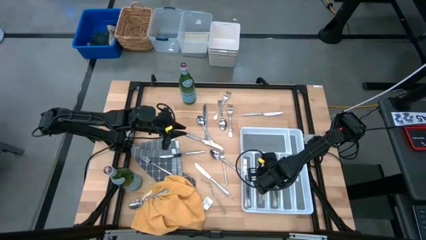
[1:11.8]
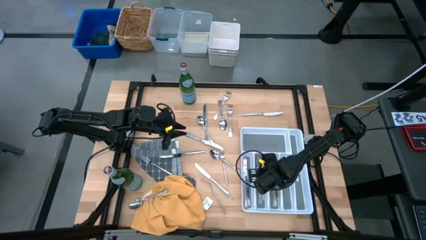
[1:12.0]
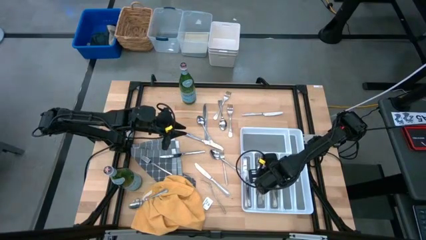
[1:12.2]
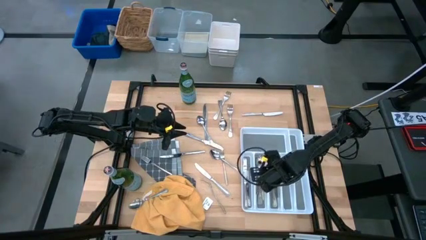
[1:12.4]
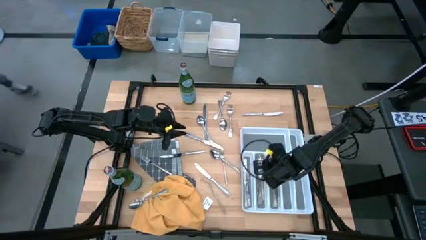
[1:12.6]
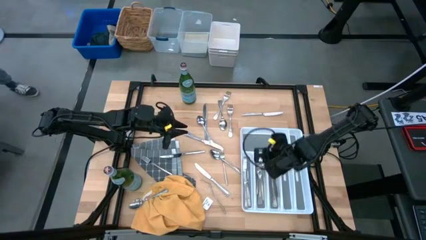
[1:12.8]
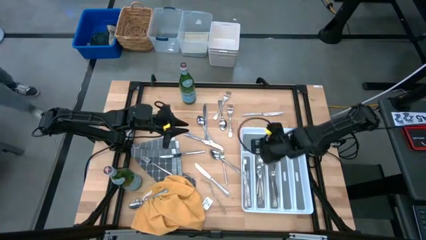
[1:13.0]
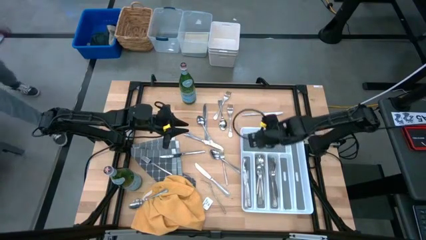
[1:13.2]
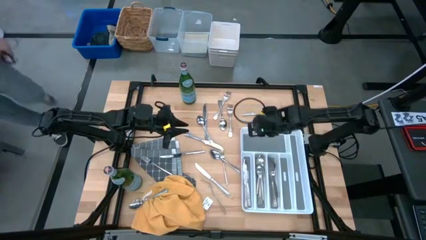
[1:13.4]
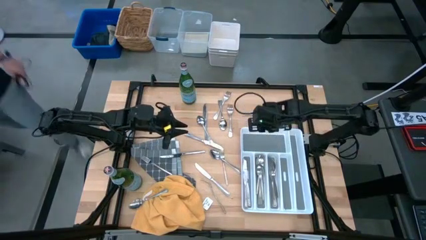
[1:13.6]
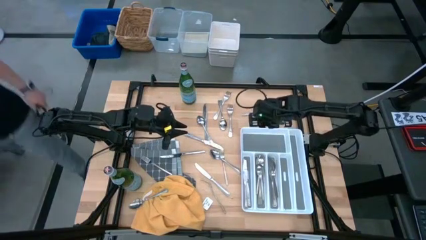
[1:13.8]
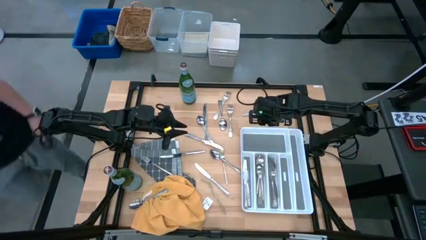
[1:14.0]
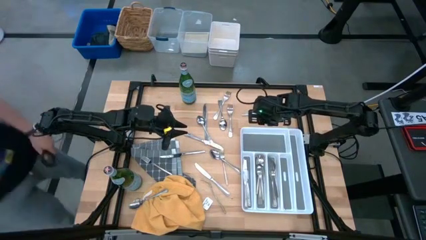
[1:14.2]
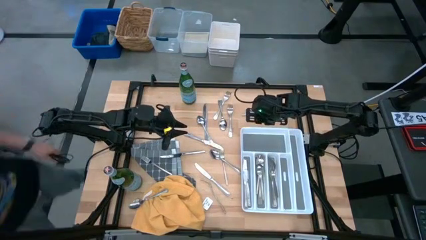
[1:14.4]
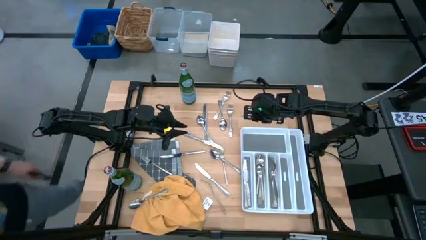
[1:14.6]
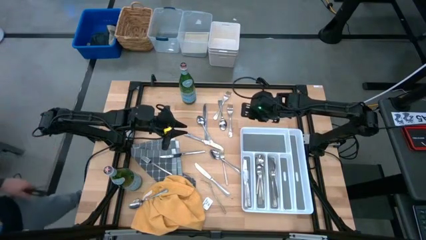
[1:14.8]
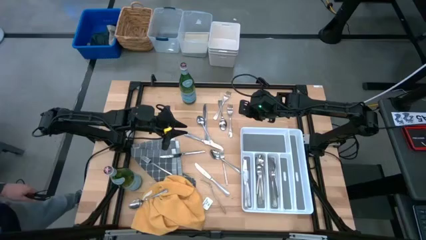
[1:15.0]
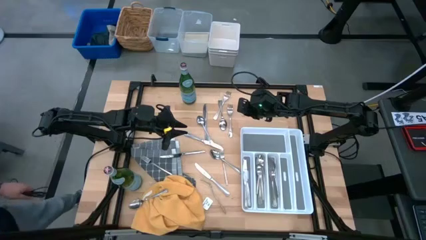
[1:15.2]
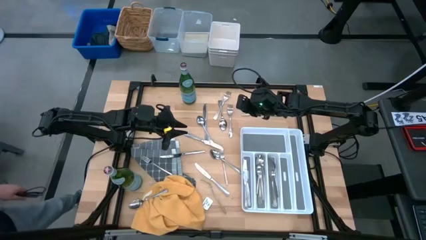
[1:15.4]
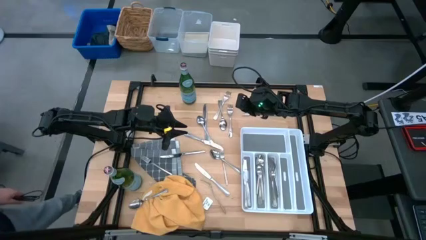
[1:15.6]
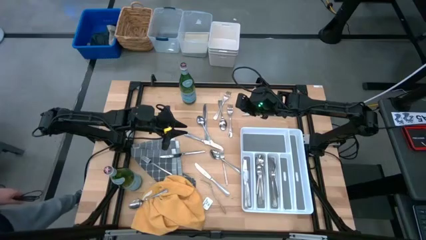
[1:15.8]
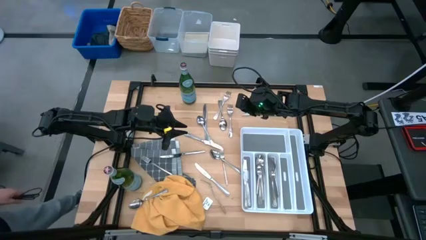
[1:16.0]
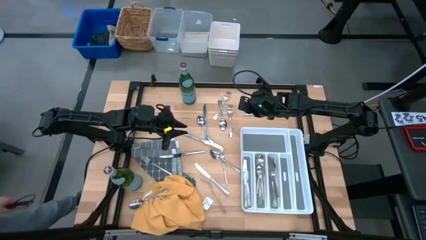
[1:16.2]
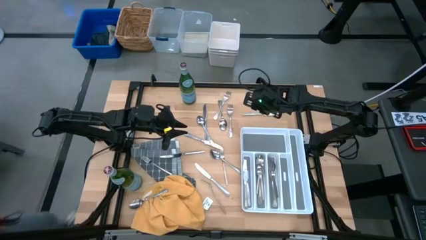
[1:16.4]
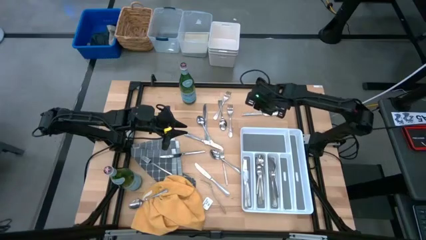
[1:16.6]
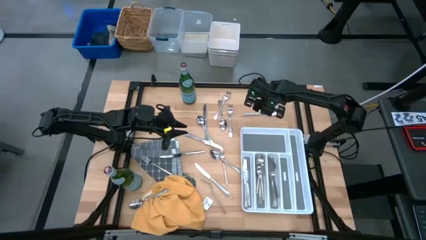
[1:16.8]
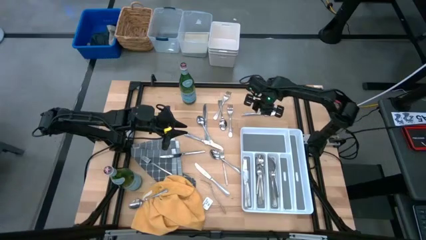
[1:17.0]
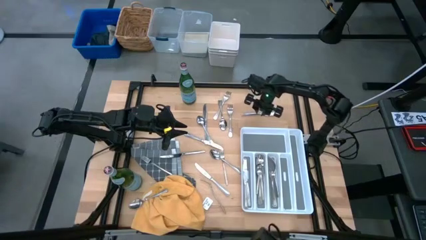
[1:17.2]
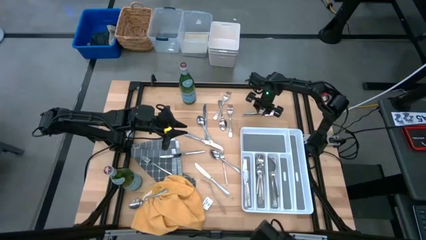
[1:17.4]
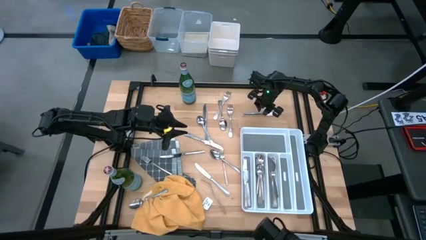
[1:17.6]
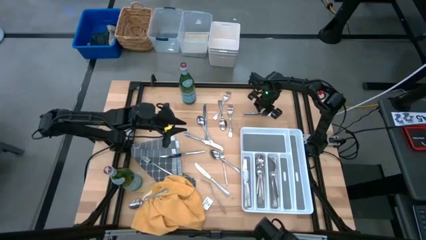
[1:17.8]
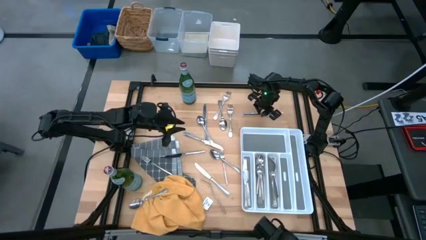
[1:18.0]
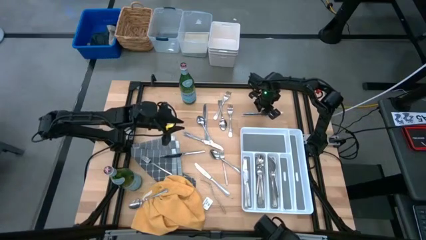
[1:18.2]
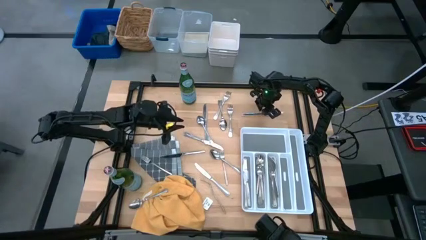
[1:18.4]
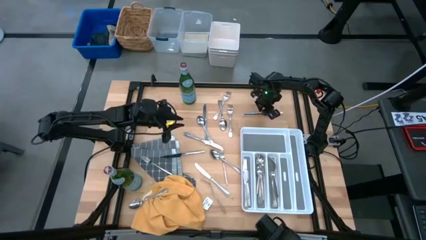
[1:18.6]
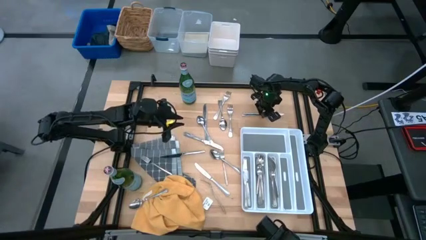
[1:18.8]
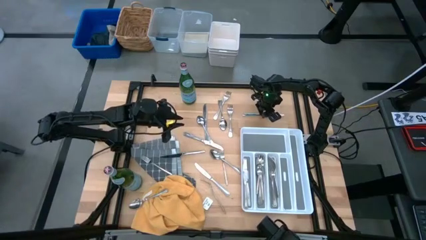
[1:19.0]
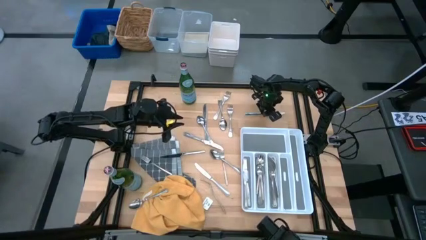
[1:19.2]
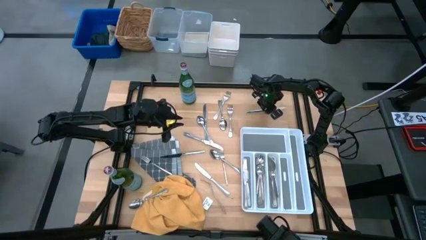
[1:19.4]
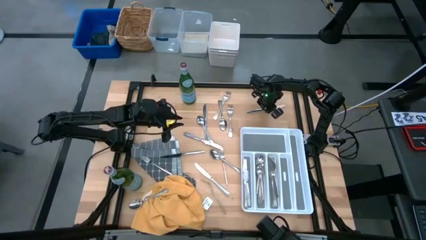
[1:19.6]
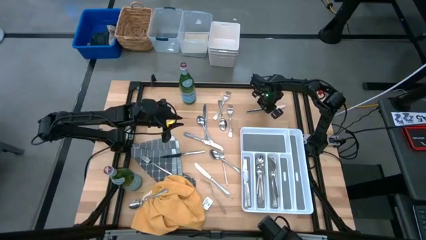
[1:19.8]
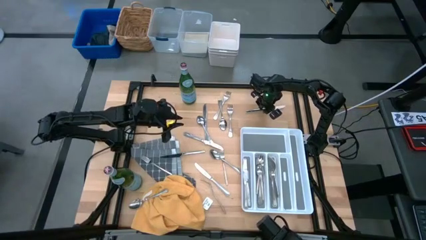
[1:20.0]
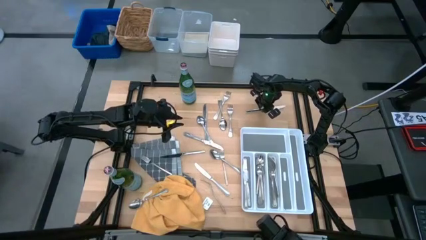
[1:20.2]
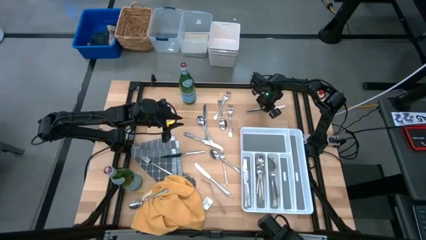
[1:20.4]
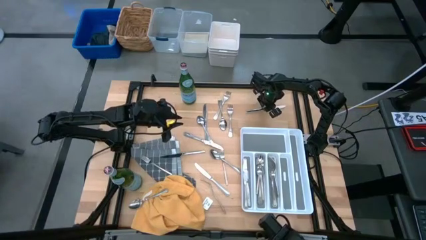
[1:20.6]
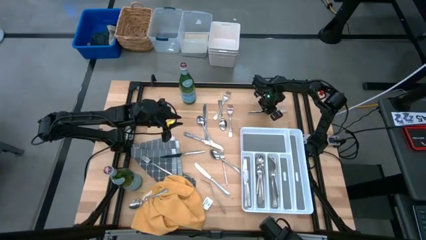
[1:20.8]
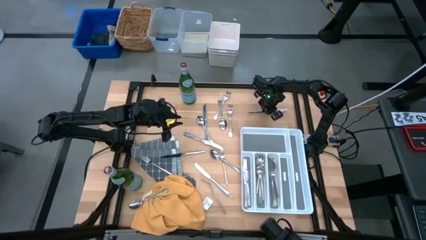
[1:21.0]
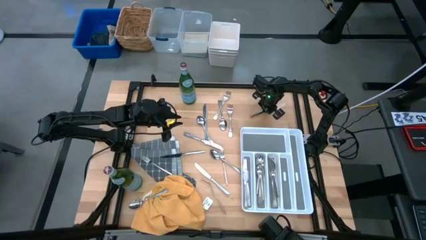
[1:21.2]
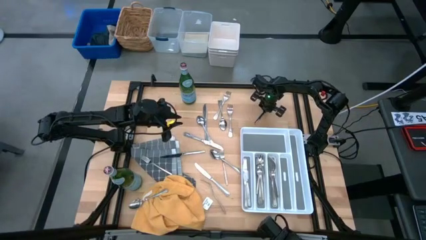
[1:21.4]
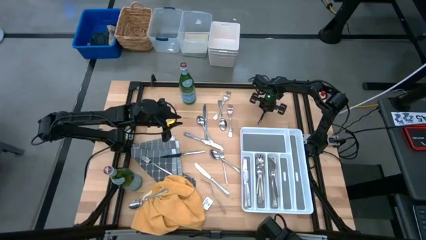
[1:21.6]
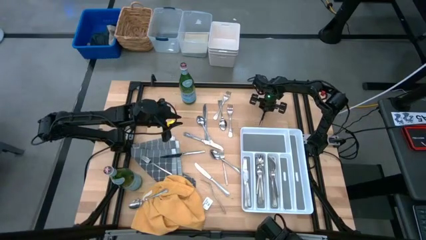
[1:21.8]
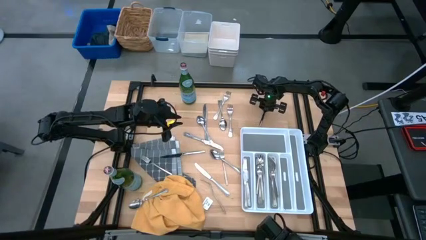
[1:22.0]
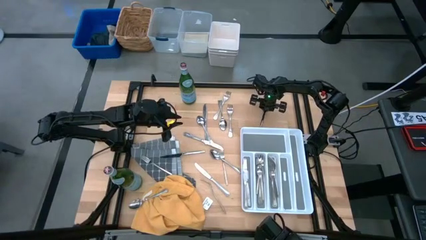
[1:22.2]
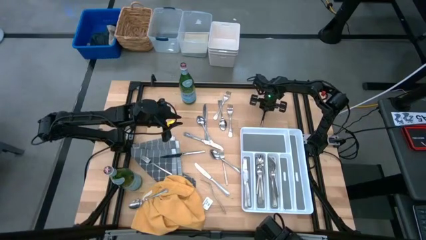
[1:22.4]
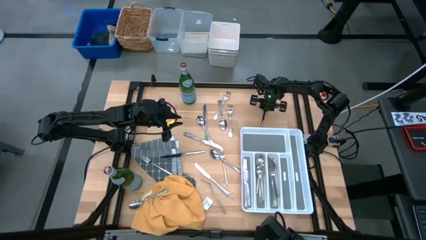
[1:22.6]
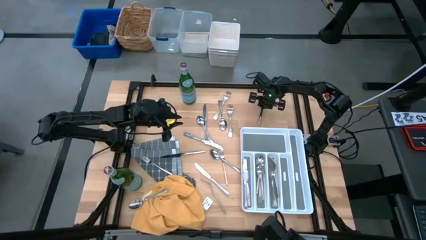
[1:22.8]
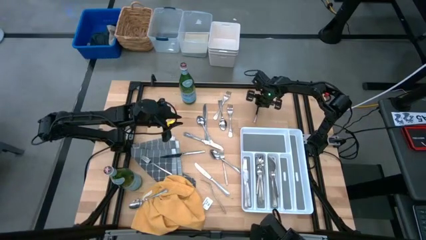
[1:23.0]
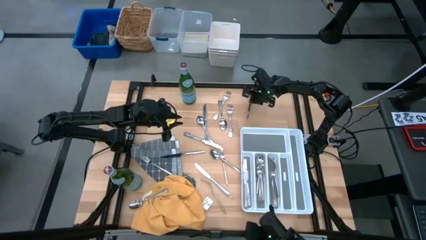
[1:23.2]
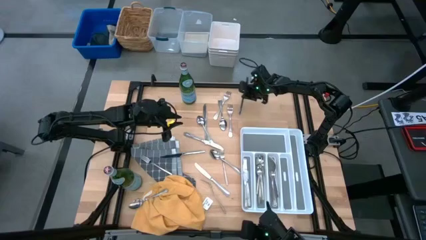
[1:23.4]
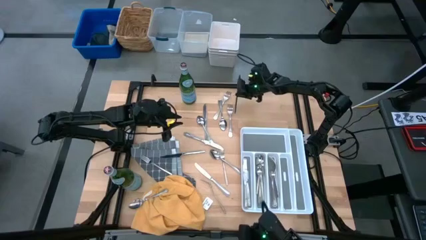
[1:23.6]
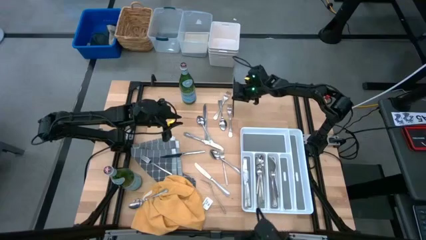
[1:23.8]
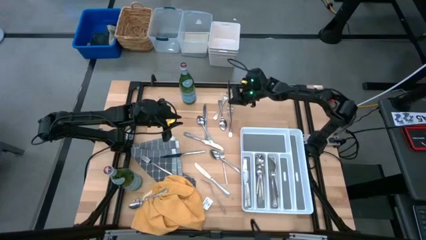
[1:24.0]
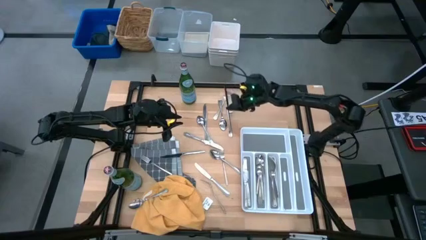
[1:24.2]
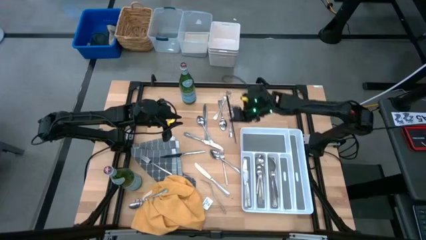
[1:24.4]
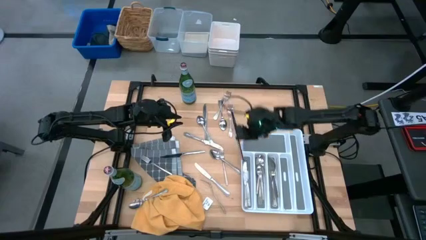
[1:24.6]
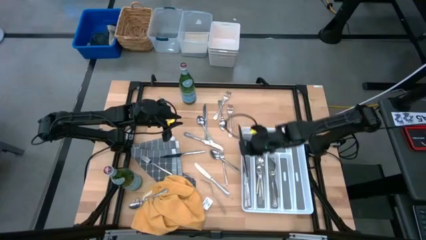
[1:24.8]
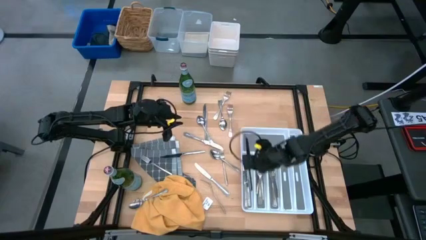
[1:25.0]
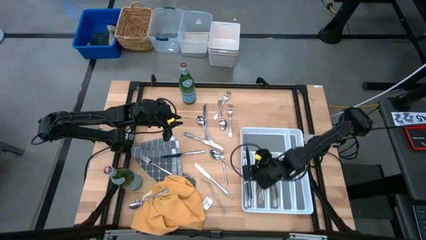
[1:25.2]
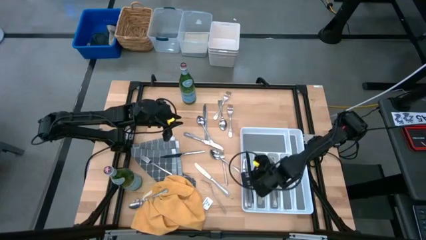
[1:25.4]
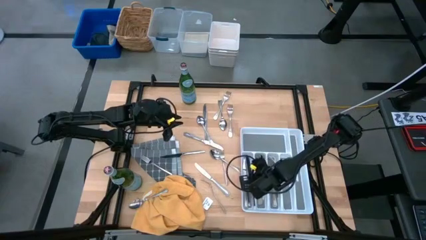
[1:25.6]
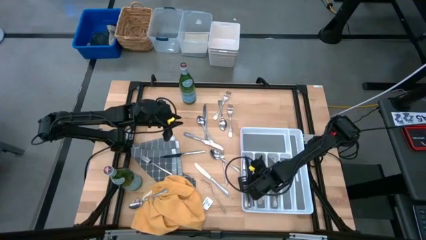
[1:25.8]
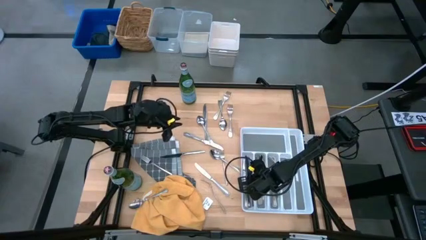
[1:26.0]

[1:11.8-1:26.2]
Stack the silver knife into the white utensil tray with the other silver knives
